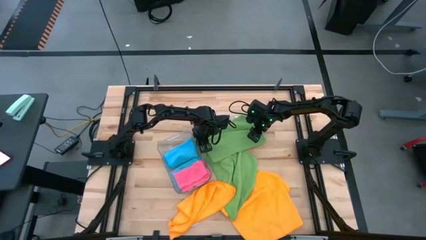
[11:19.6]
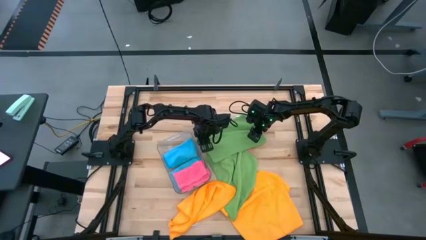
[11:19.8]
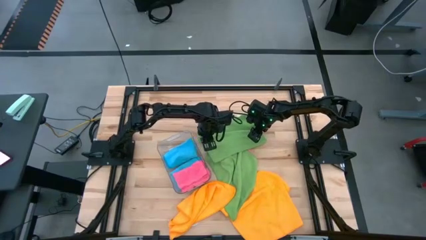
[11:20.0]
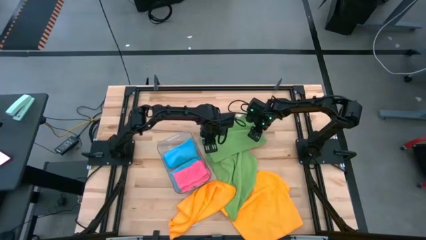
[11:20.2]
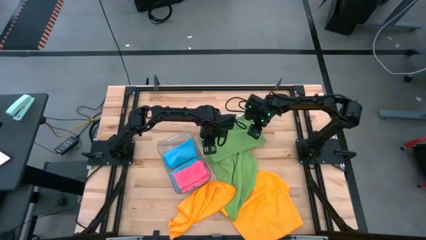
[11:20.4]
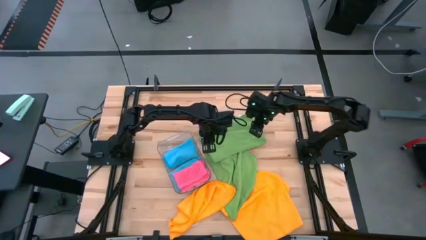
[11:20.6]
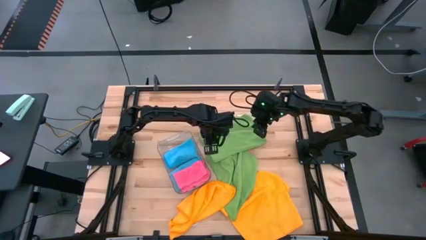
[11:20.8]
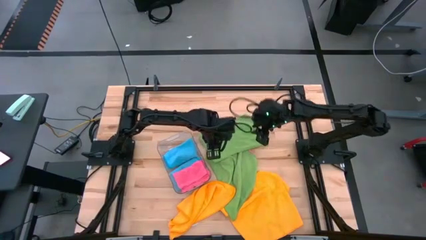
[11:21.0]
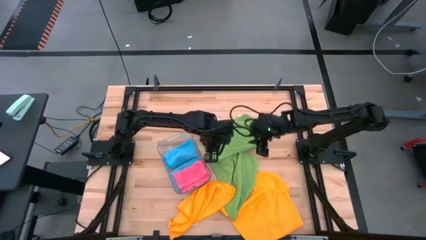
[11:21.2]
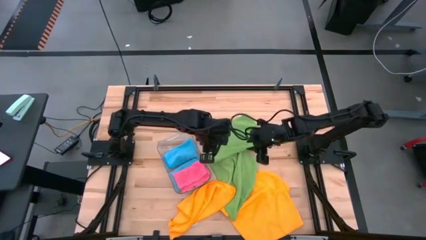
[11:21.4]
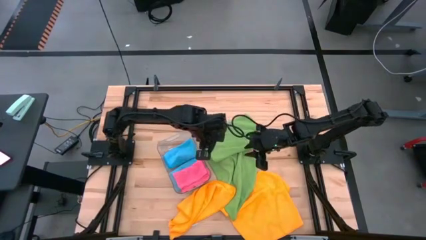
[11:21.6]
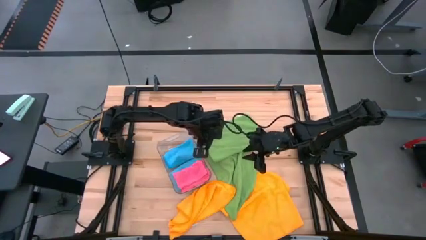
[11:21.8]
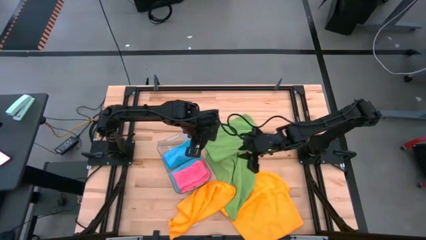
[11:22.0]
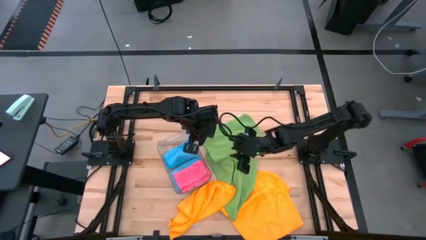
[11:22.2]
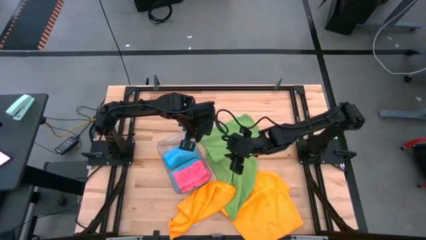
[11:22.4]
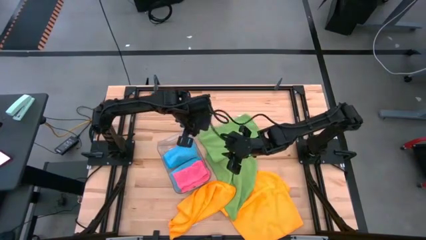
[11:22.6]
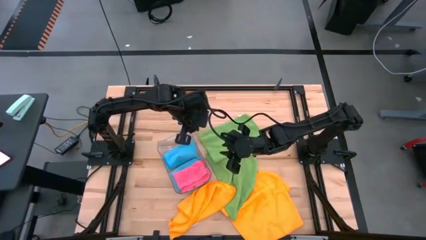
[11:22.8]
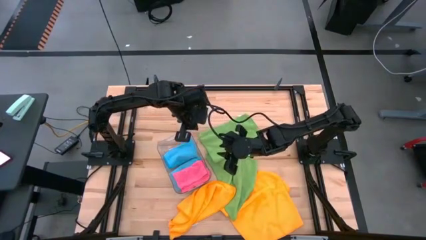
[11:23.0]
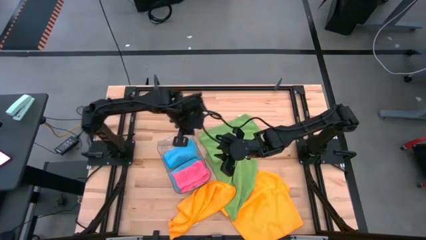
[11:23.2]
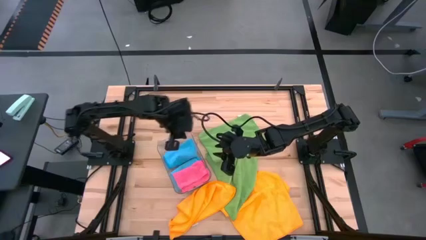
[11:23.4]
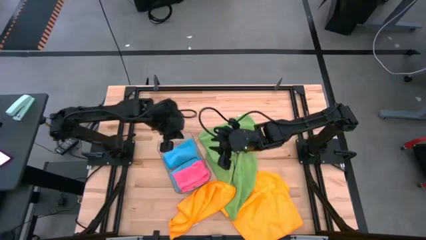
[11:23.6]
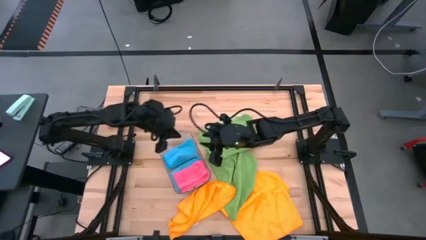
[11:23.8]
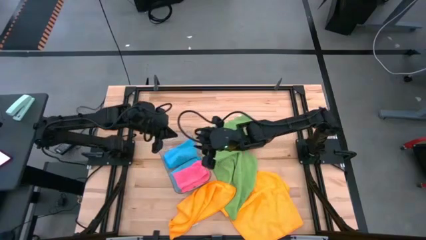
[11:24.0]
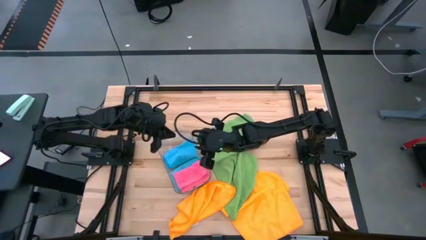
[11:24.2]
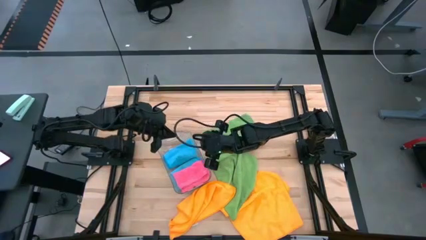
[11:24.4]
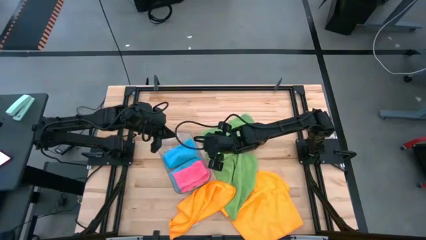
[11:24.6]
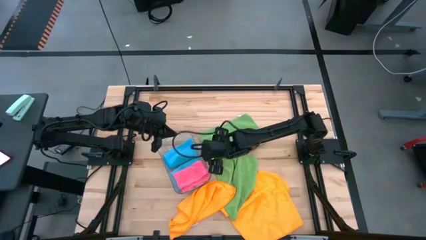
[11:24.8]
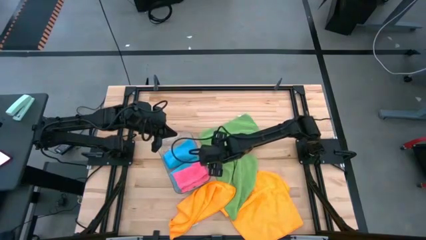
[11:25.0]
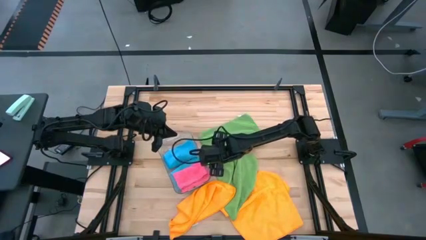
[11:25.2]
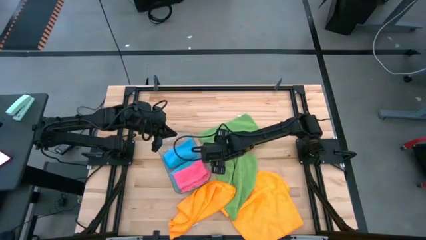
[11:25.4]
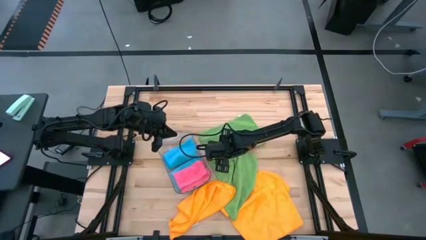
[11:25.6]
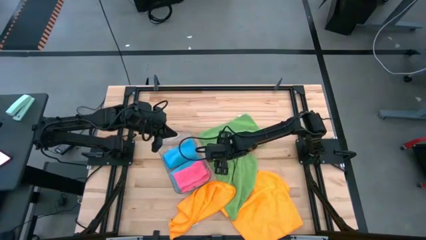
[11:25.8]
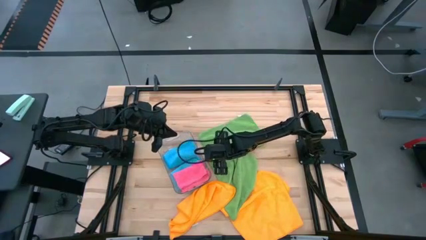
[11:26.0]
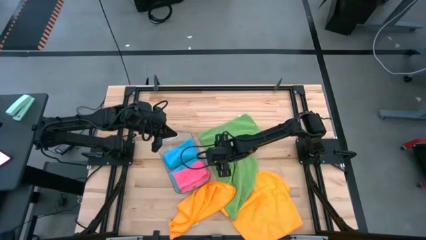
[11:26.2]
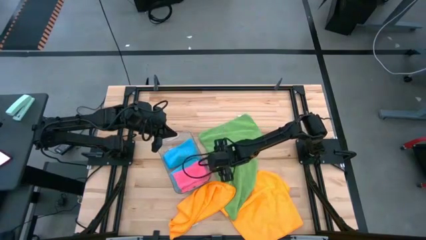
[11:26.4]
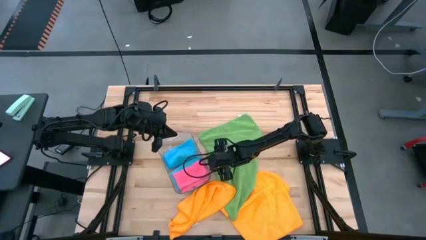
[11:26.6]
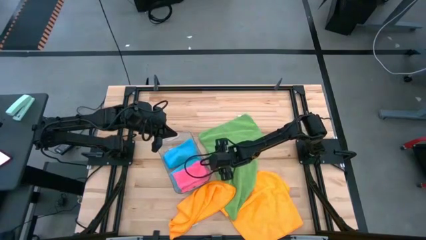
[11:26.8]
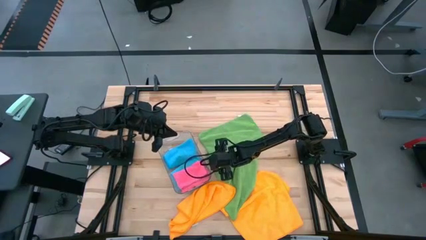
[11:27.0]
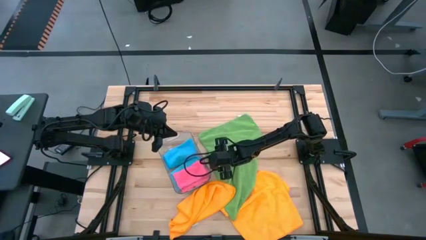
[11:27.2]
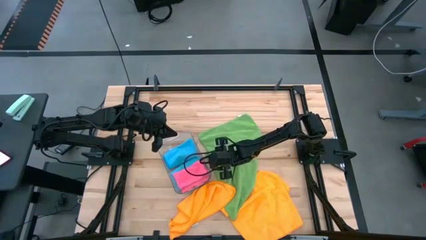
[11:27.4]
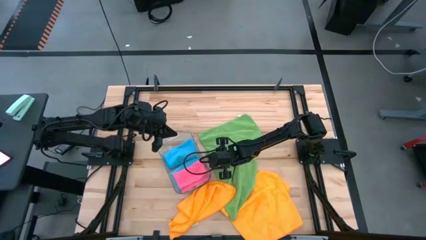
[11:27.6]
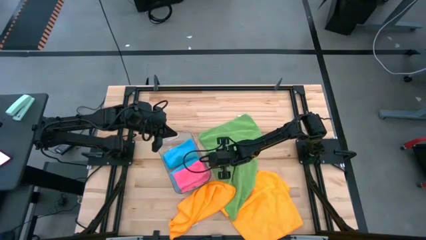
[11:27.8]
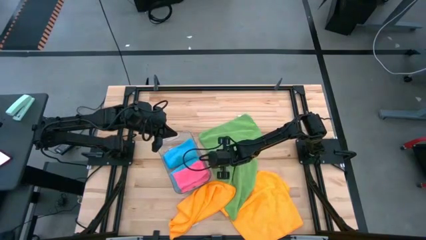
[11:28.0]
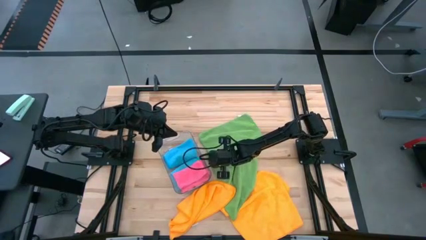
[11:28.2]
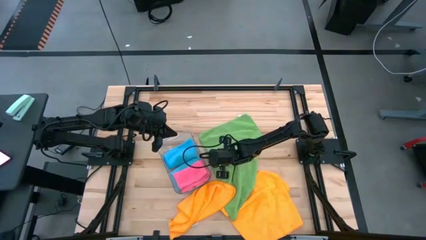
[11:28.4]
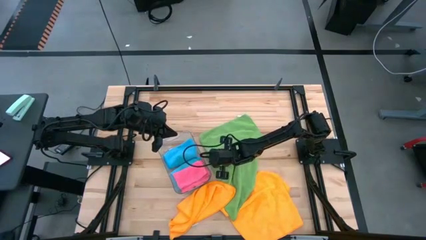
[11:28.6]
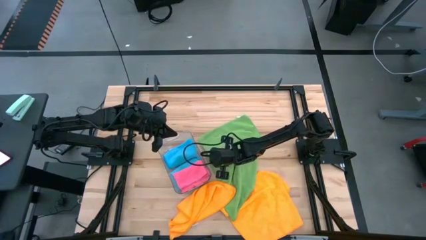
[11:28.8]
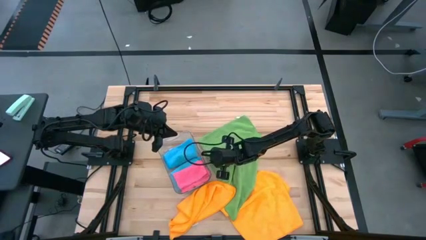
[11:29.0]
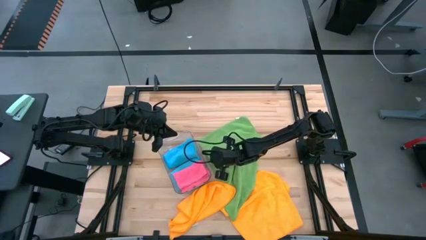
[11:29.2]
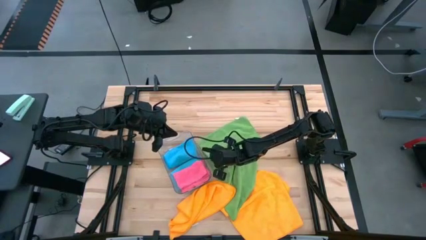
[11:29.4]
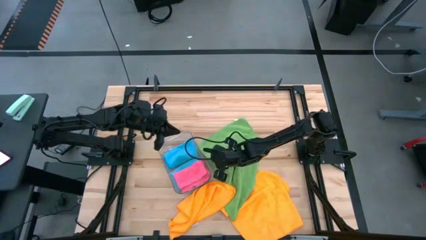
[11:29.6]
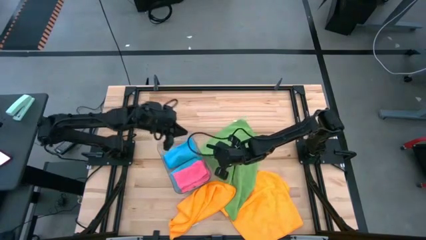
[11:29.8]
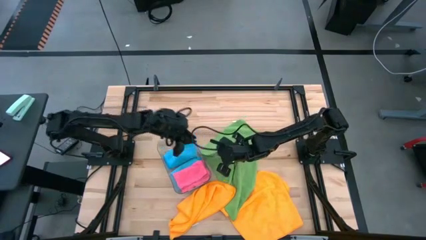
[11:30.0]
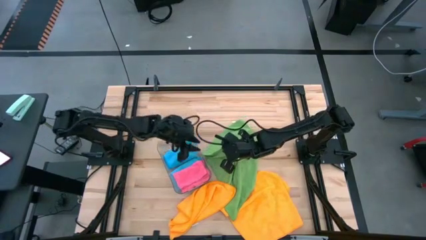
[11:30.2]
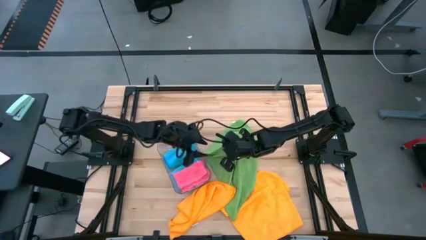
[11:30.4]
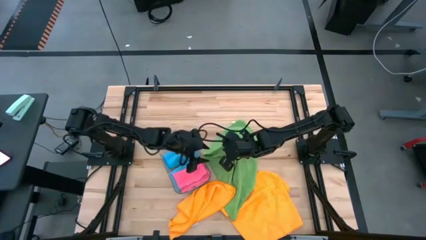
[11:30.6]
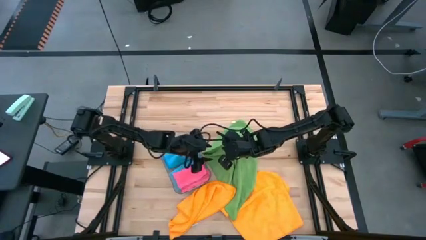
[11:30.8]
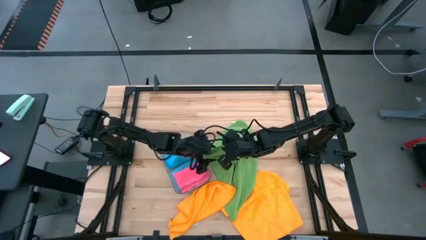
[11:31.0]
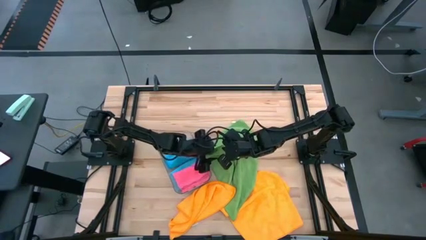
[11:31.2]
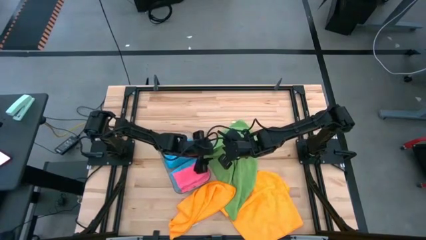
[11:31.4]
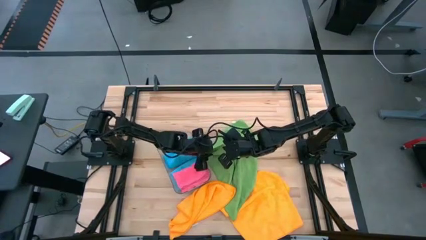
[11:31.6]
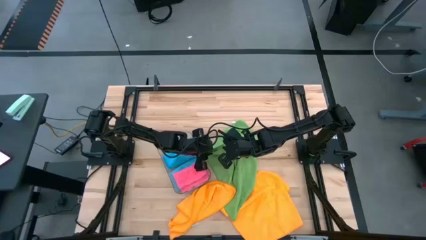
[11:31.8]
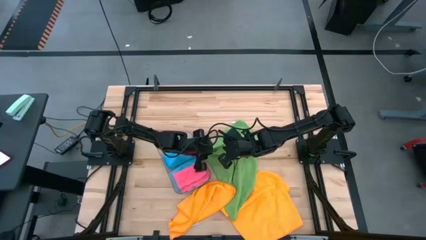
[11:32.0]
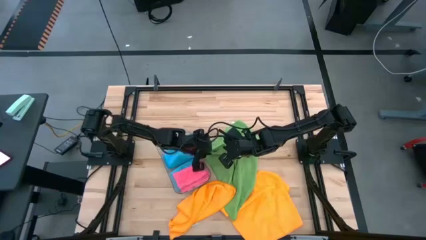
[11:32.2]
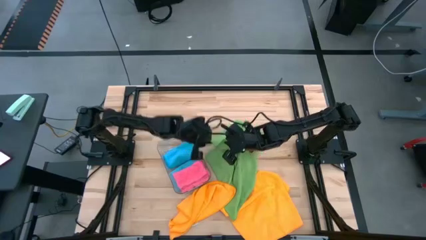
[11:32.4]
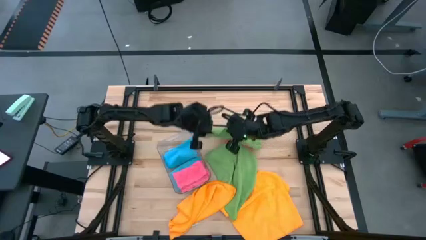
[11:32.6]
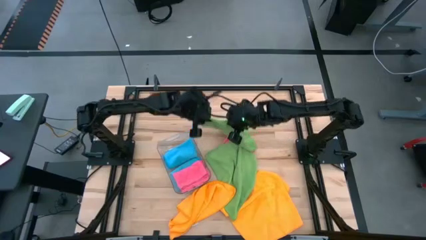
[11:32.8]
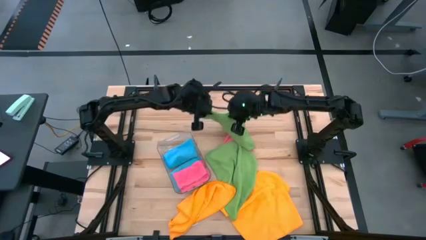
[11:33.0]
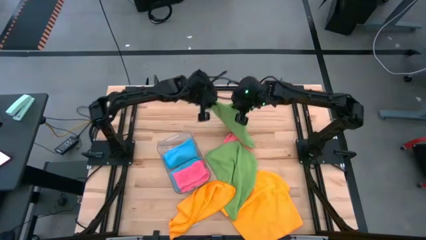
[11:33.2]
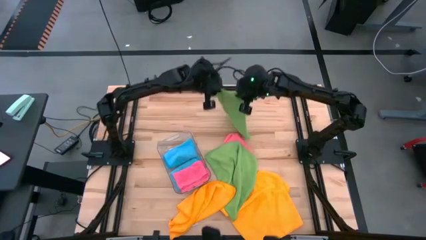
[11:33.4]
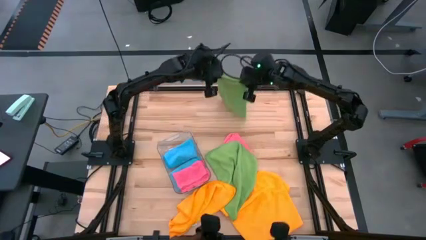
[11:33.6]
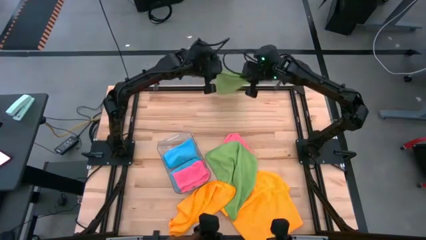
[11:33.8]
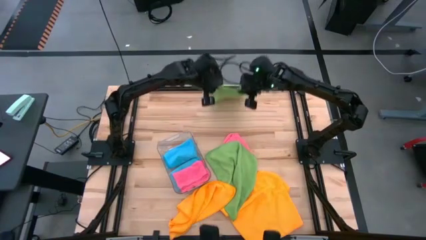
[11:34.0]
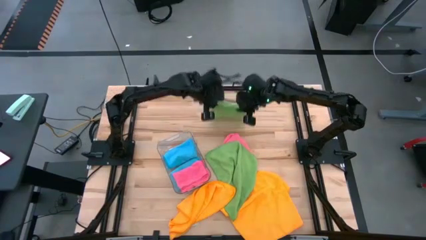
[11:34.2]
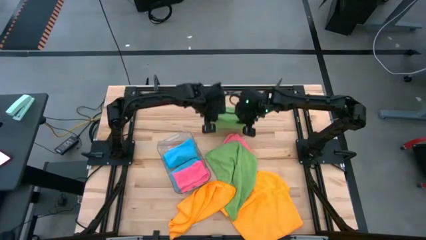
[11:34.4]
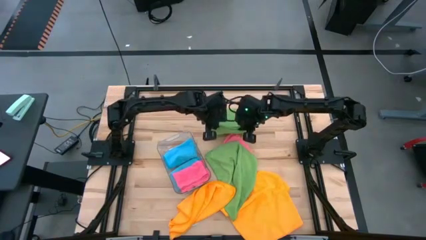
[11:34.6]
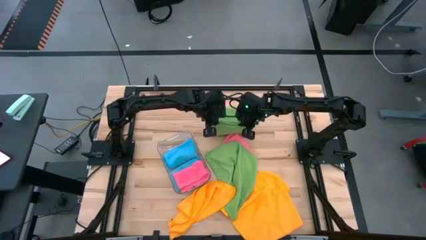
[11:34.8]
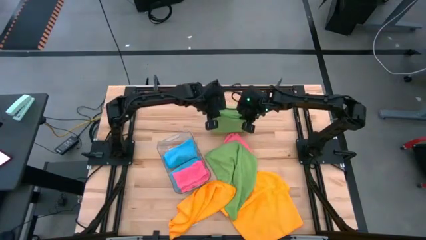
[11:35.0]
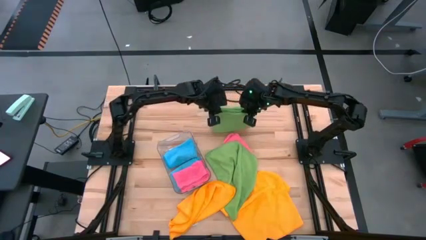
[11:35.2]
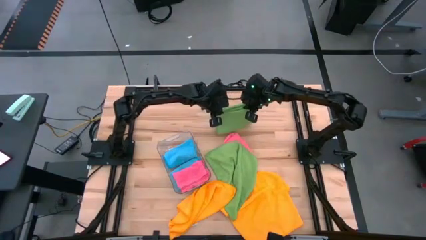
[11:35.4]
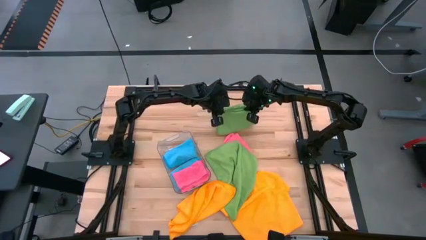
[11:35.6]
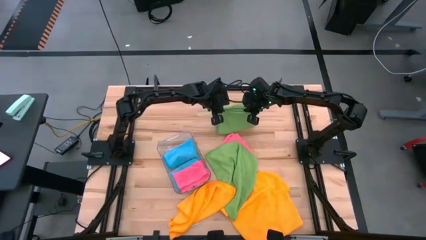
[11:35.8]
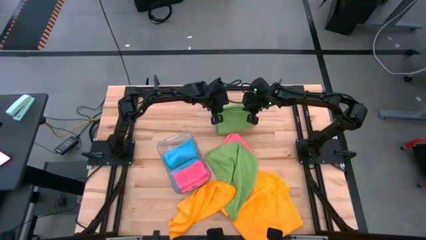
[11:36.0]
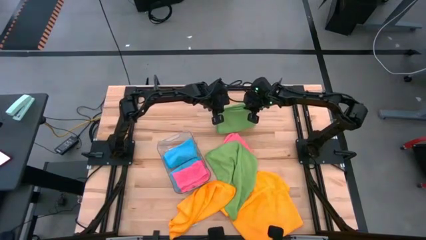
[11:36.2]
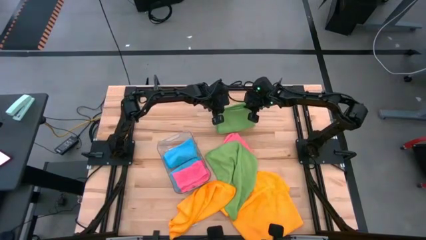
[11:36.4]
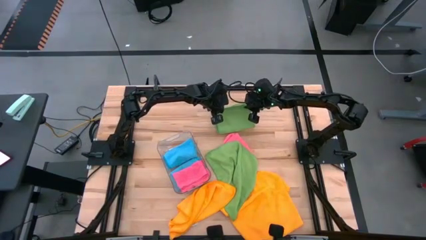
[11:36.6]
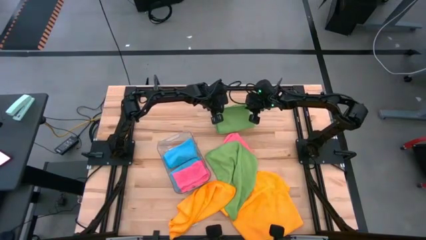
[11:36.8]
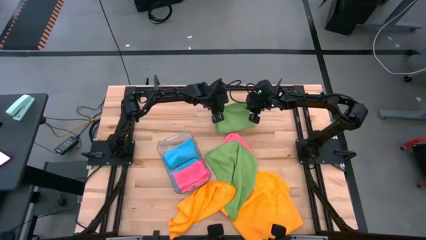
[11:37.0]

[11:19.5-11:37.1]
Task: Fold microfiber towels
Fold the top green towel
